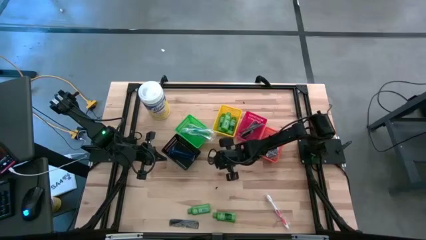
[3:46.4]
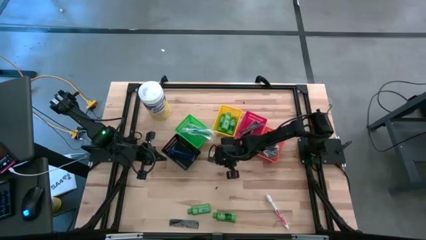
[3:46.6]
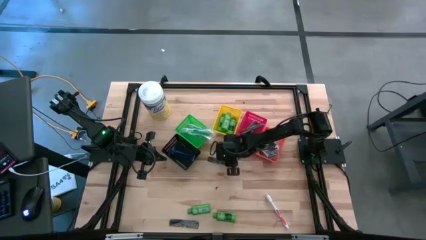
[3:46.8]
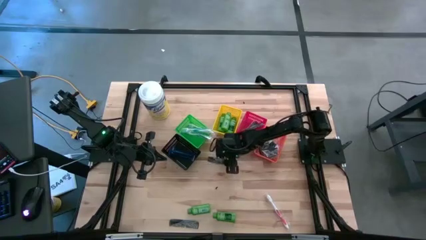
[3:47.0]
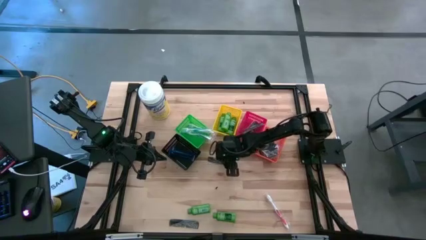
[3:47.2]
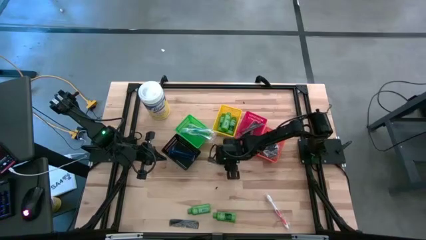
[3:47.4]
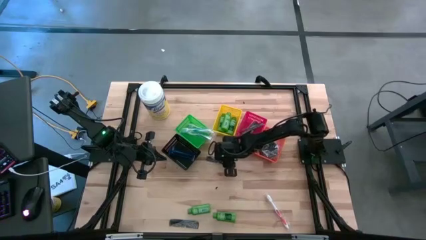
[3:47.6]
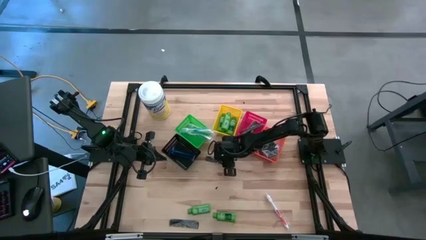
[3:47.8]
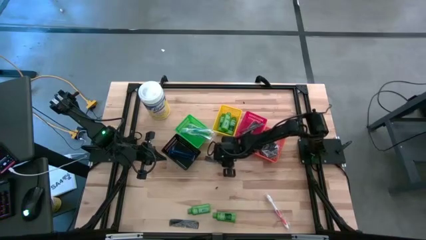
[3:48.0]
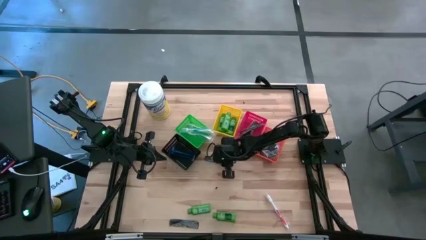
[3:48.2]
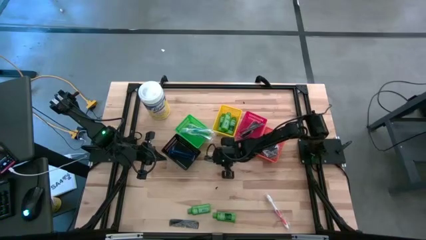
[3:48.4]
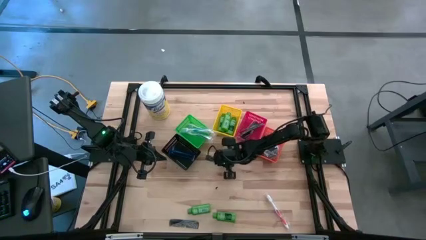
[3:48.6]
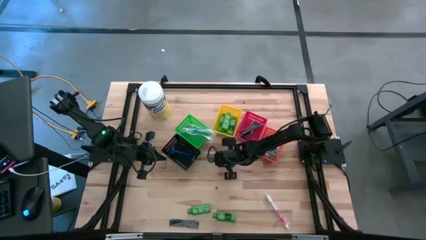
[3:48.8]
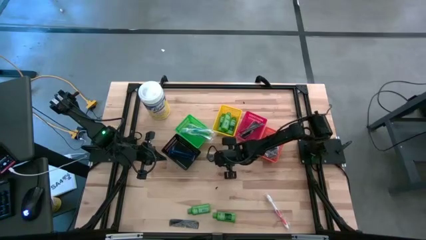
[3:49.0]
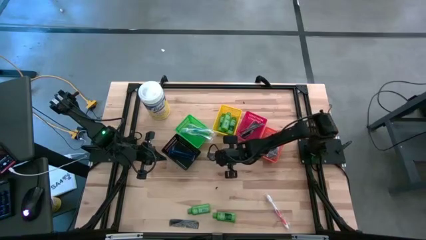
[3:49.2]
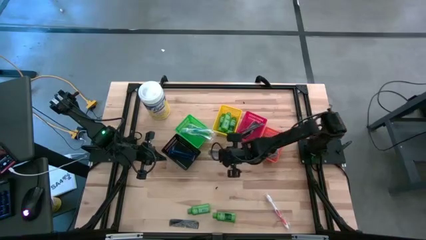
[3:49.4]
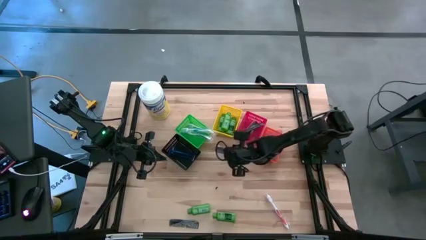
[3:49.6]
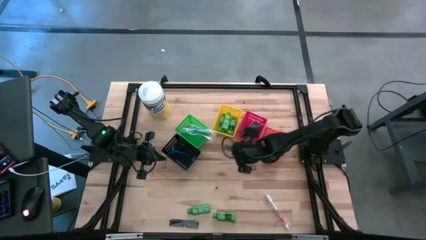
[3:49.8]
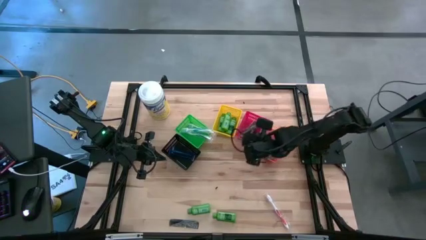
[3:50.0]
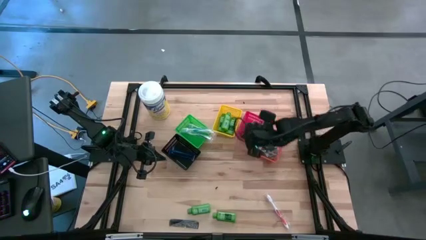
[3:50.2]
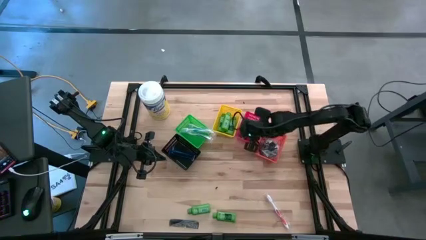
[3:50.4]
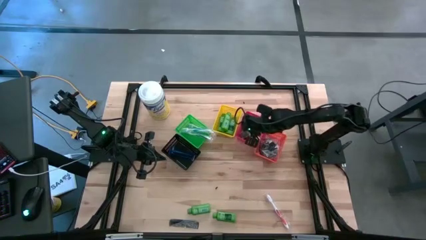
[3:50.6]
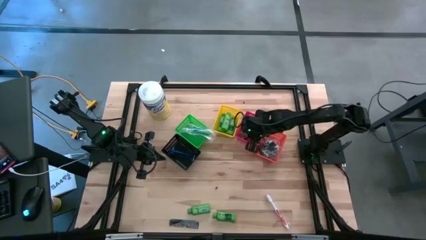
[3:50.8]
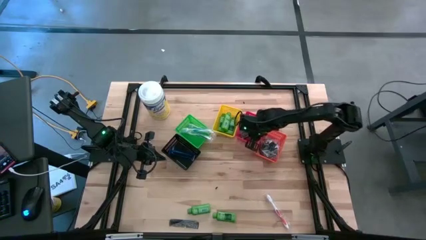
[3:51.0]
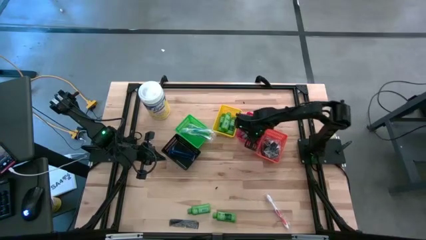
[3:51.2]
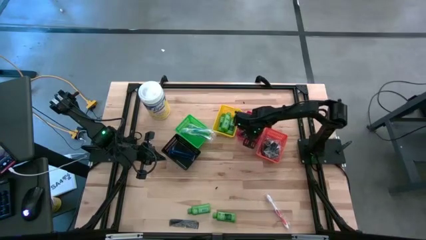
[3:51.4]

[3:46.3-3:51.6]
Task: Pick & Place Travel size toiletries
Put the black comb into the red bin

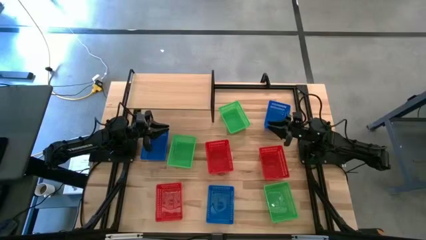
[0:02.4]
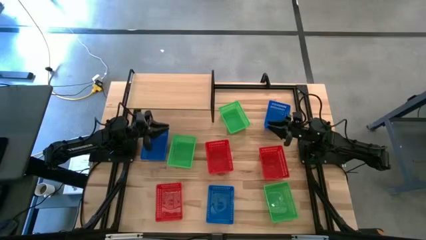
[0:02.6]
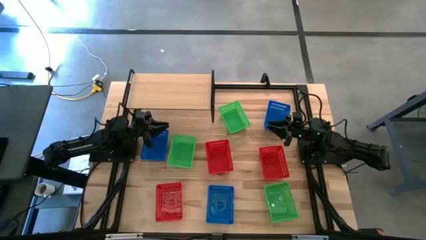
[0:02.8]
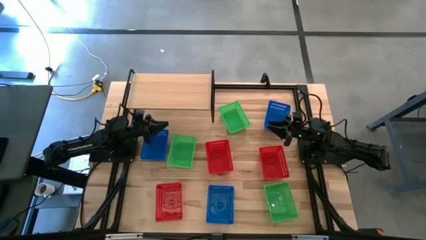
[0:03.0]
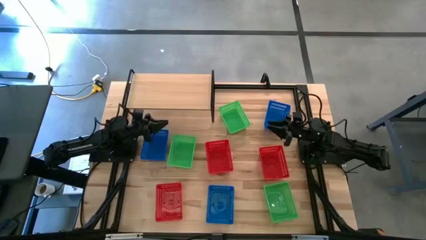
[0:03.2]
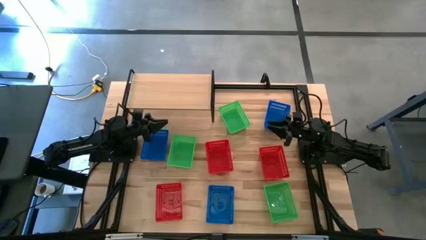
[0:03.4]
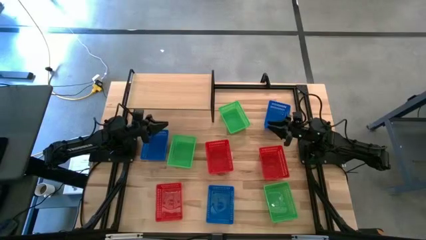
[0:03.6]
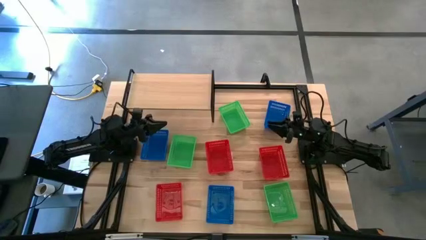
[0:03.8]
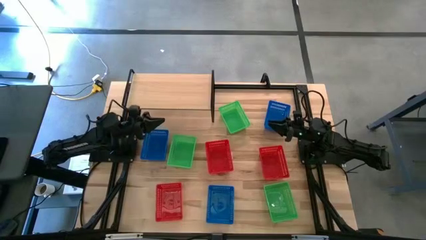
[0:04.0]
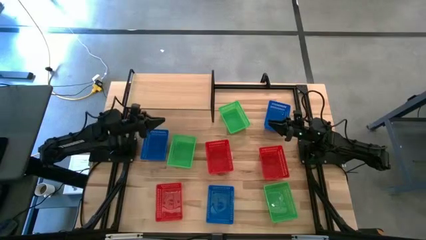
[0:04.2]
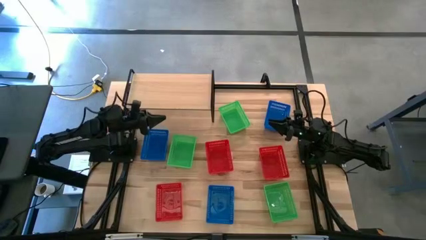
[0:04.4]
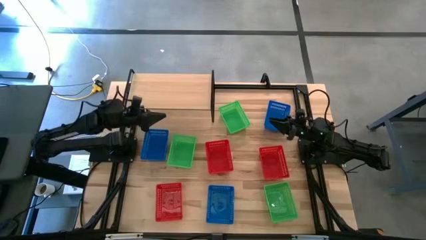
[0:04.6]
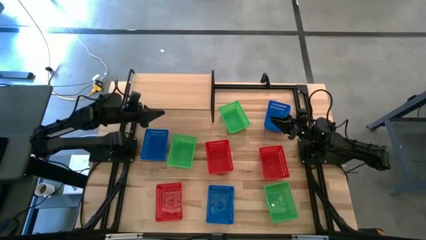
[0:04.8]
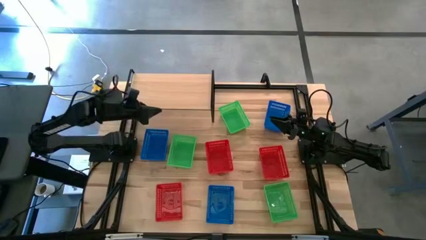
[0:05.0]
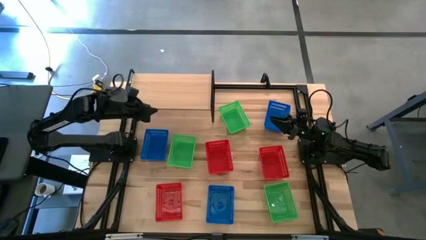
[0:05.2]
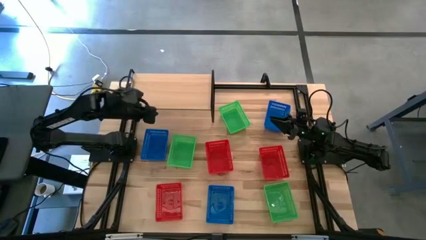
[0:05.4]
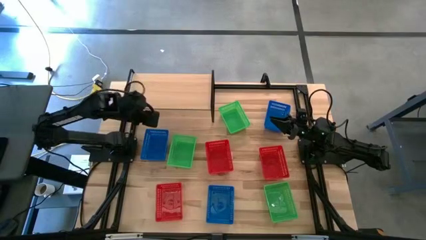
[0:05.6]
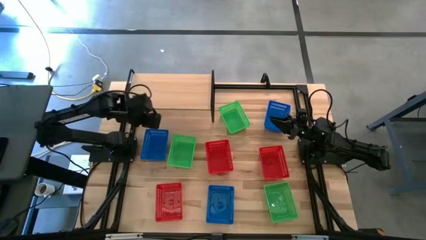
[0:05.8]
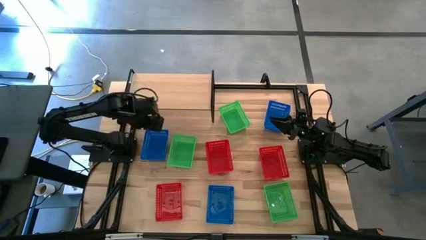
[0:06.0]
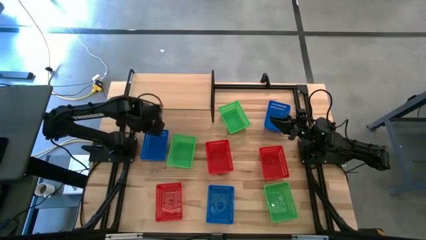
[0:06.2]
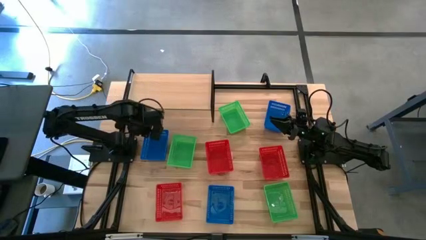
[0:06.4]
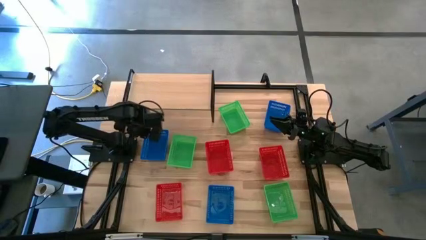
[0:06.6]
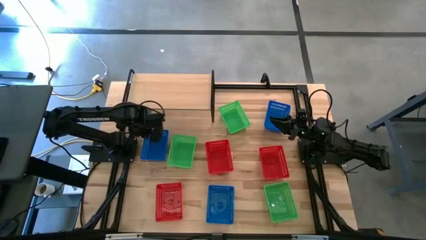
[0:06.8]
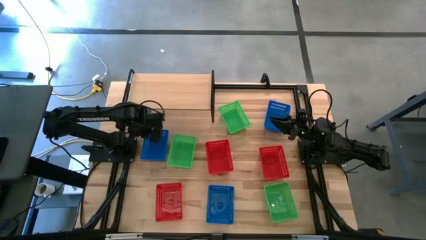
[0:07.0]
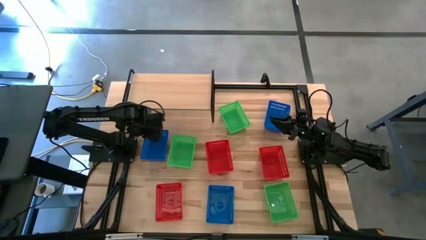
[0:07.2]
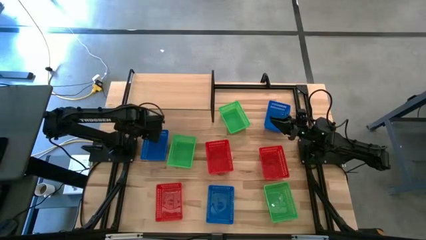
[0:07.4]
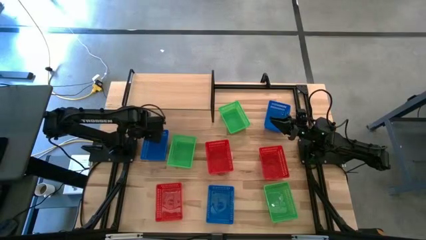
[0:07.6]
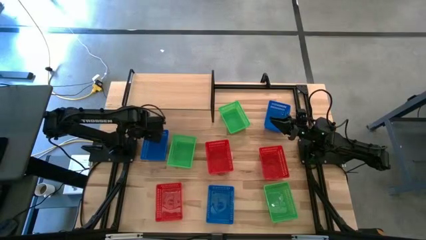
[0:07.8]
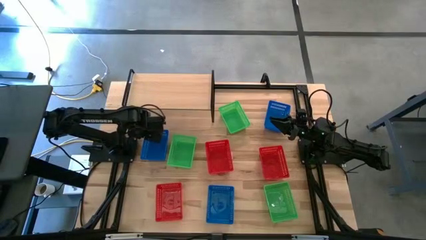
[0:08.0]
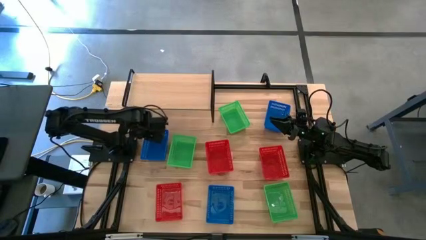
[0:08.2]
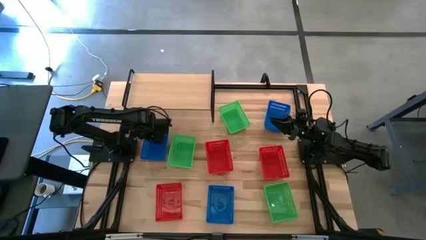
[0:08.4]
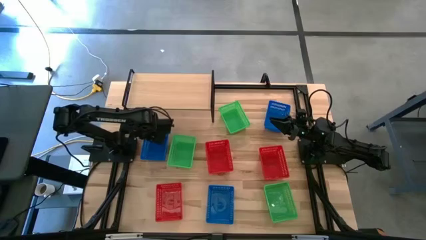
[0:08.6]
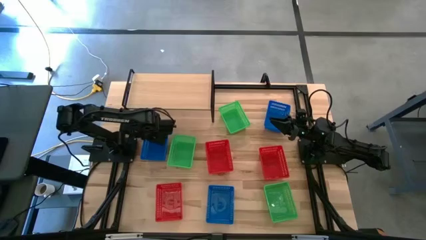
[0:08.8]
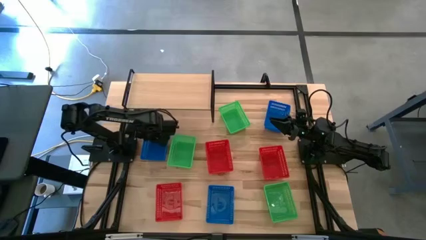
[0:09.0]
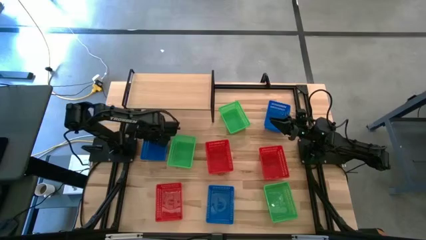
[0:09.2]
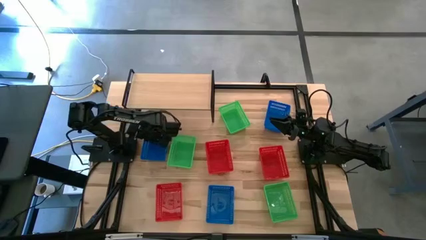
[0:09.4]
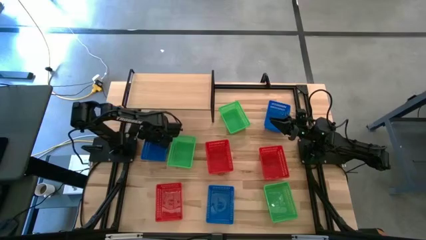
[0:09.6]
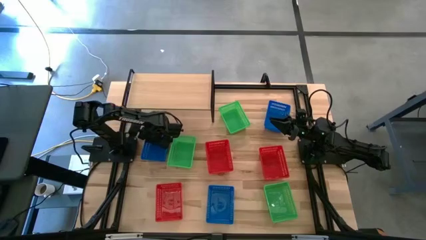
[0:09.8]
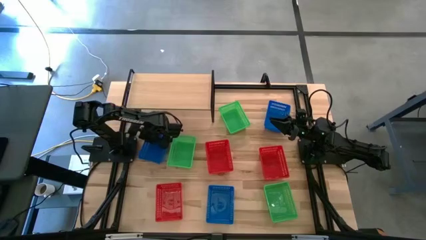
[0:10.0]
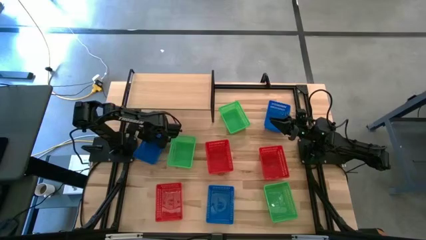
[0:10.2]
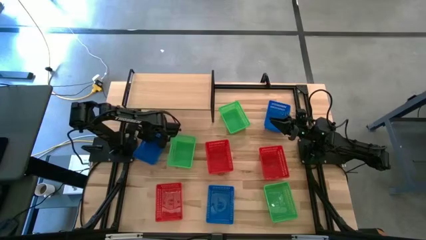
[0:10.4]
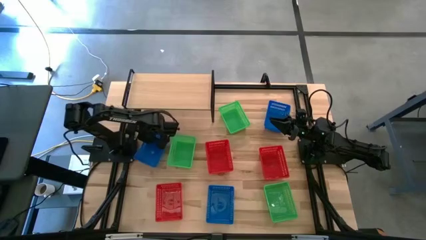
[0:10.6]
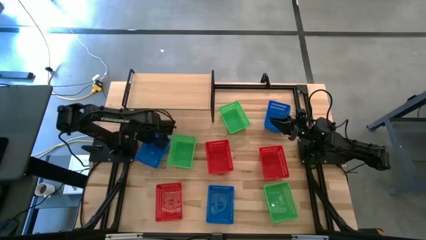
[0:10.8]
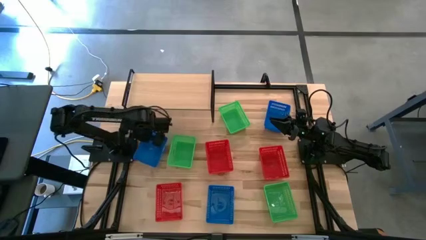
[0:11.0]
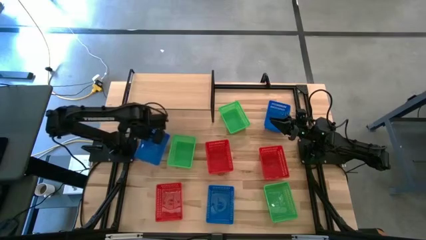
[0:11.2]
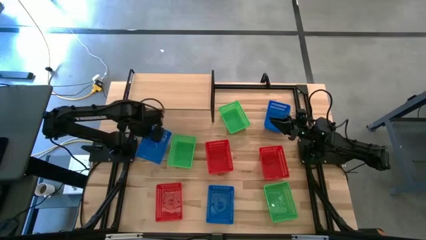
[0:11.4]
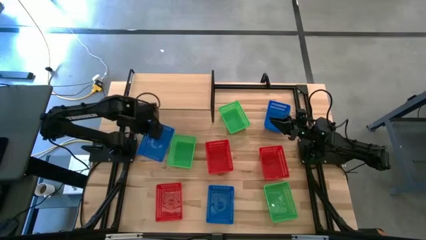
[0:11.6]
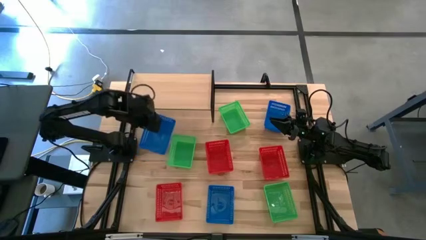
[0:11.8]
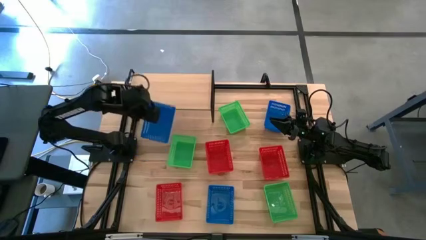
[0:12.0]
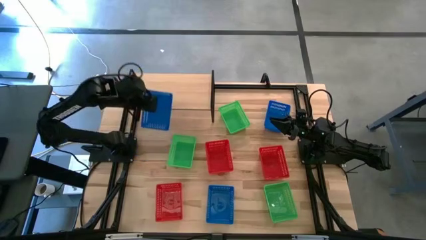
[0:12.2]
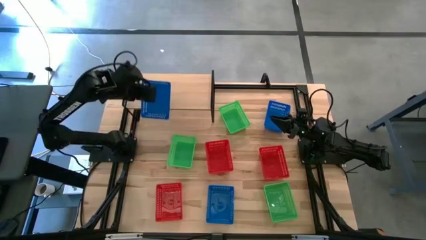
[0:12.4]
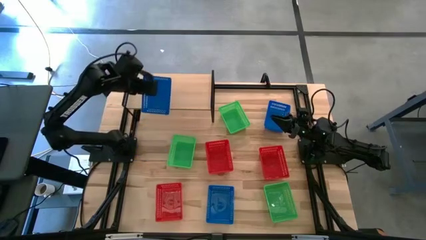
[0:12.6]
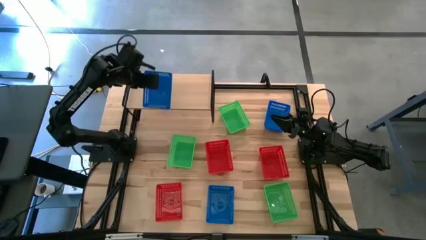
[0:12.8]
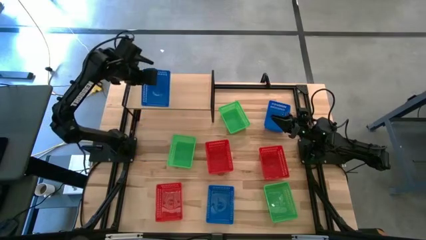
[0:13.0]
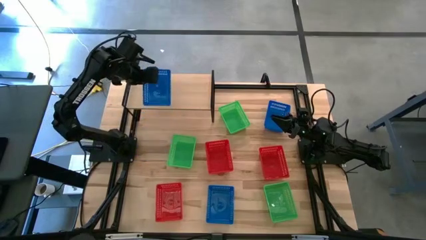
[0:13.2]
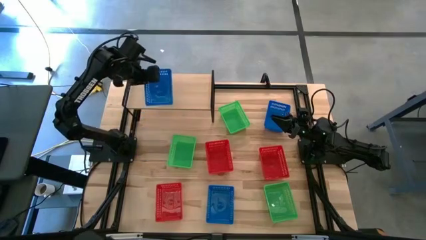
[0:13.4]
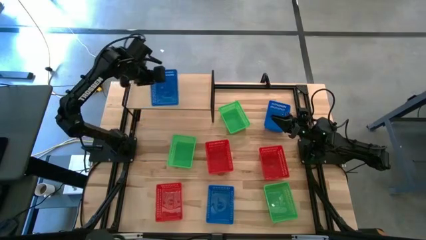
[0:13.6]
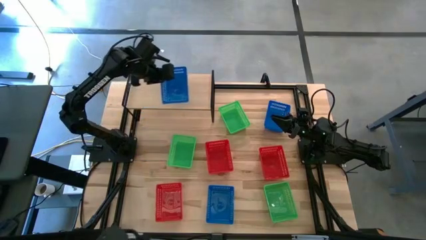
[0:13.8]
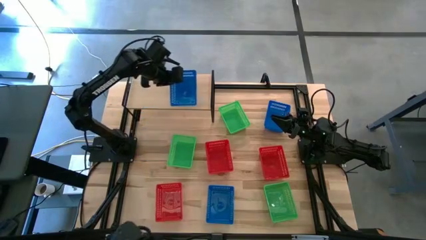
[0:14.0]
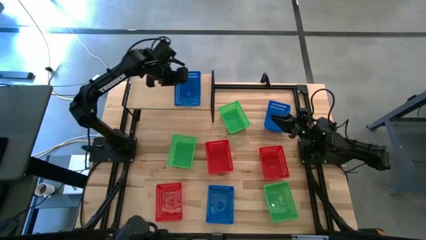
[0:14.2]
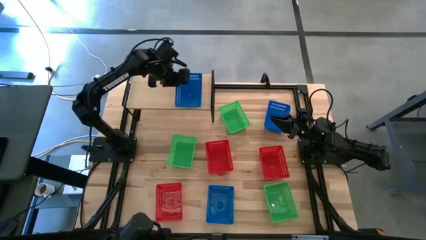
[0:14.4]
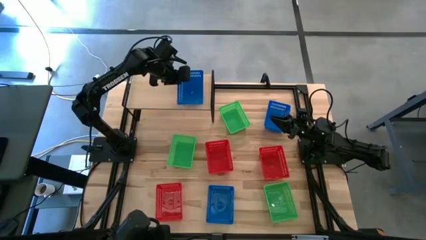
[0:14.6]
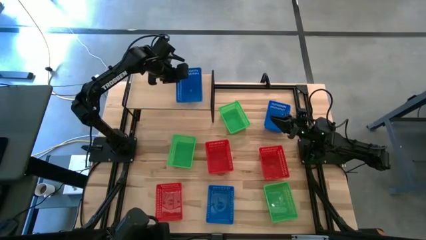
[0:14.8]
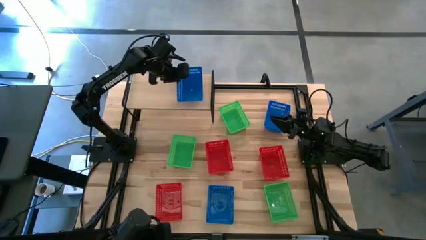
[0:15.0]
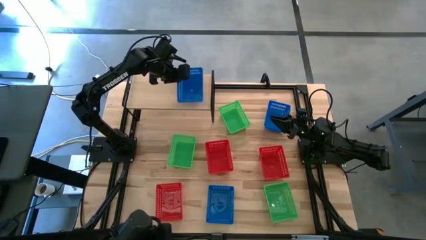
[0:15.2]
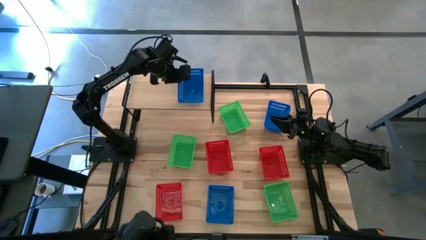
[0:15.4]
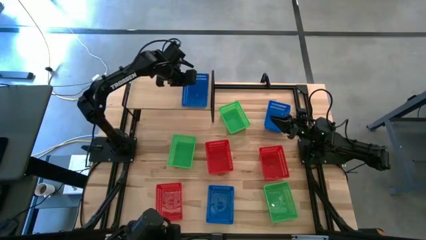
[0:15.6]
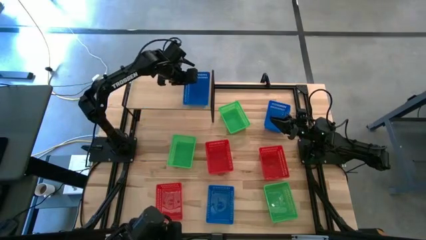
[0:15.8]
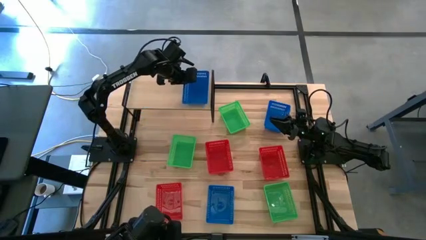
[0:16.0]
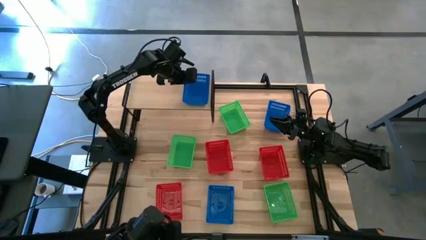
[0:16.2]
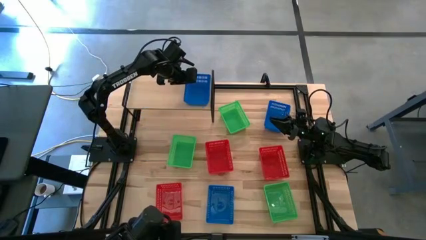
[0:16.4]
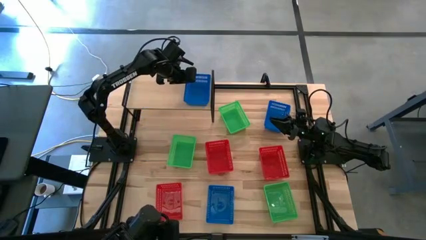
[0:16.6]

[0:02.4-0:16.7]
Task: Stack baskets on shelf by color
Put the top left blue basket on the shelf
